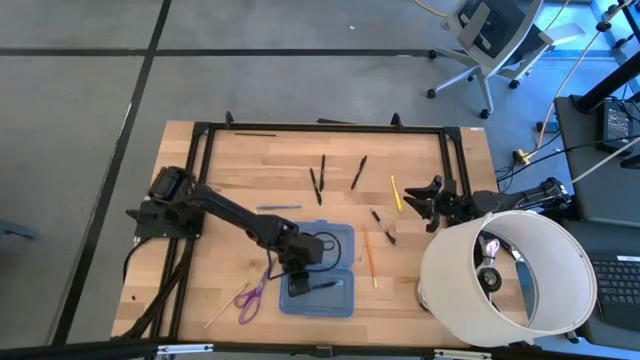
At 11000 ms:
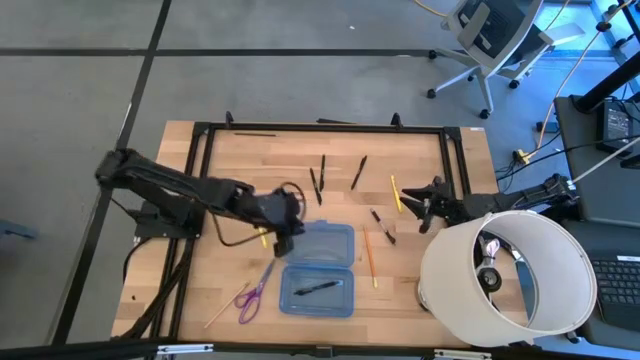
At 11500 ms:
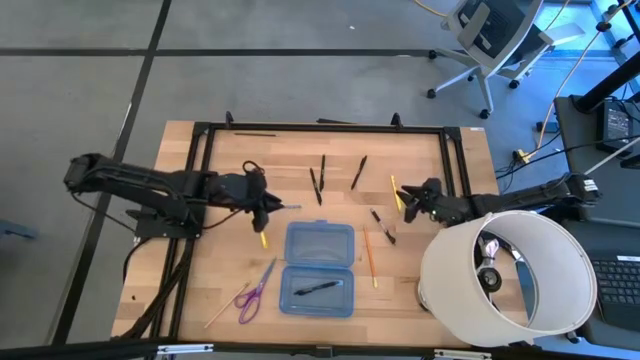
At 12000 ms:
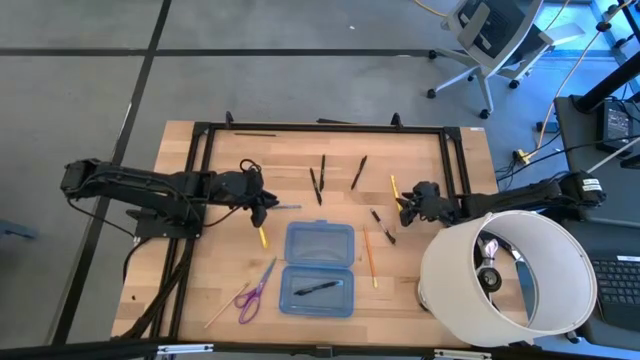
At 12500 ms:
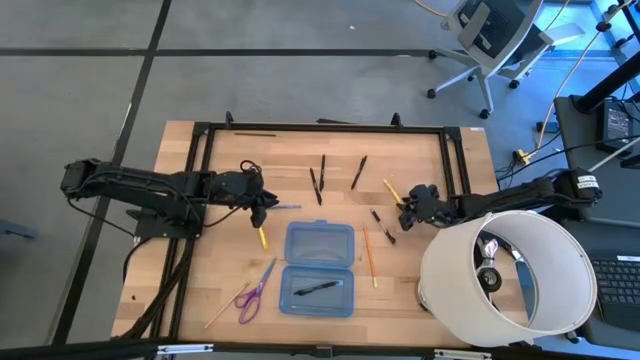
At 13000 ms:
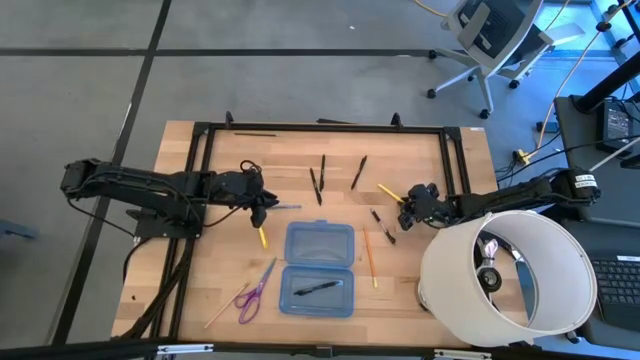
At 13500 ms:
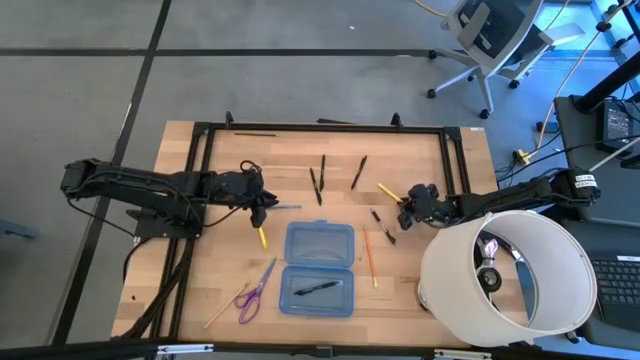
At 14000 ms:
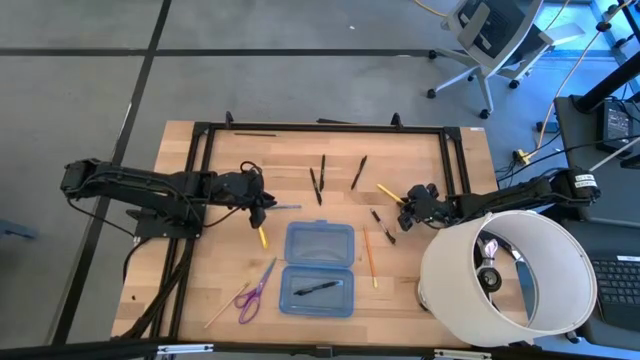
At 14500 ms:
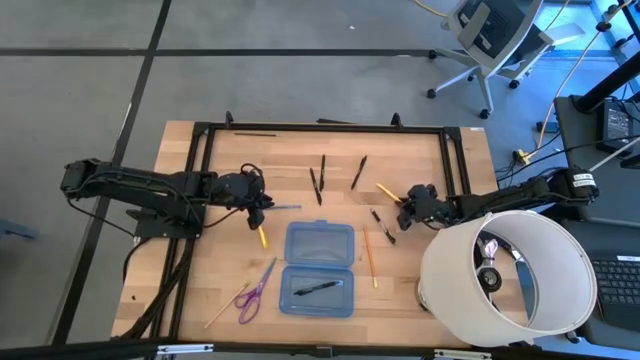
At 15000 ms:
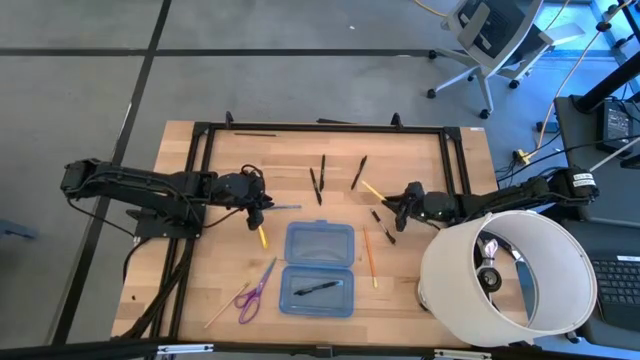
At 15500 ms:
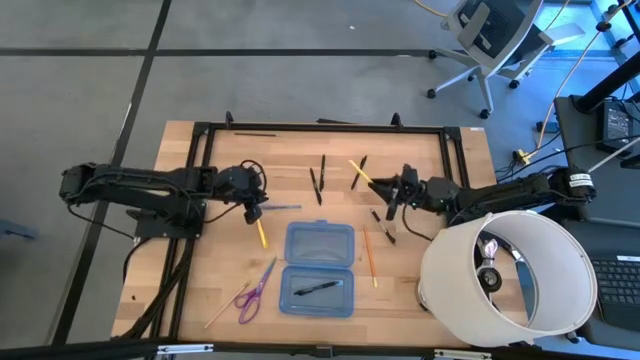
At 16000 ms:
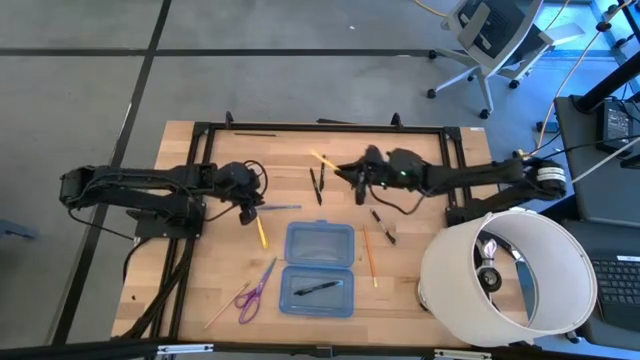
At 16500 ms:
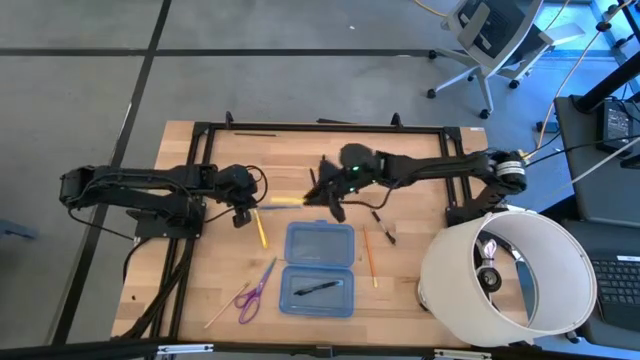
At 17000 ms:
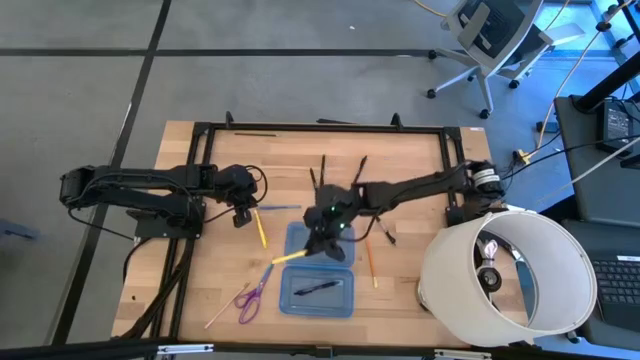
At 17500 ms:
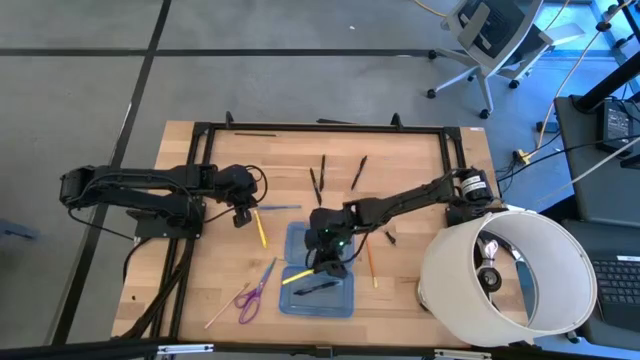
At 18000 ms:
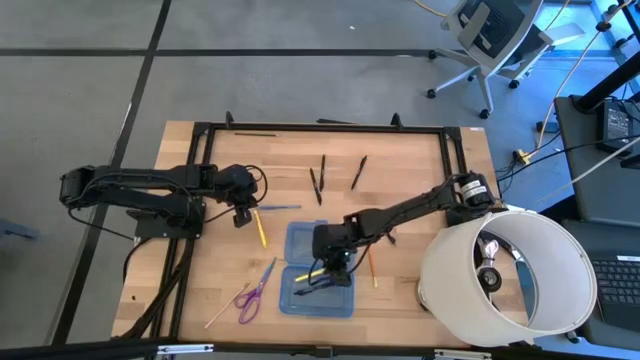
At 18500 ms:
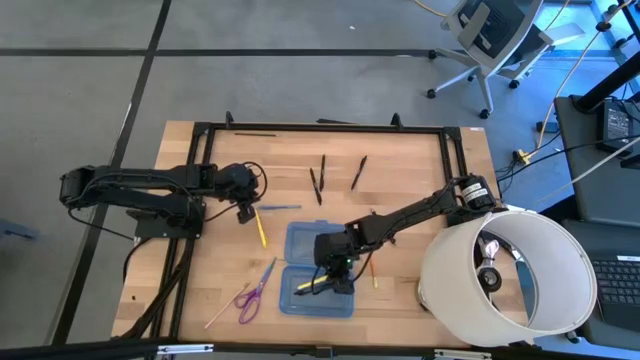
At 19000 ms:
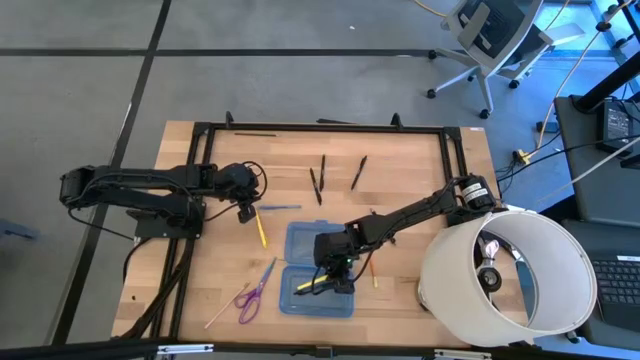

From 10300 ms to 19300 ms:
Task: Pick & place school supplies into a supply box
Put the yellow pen into the blue supply box

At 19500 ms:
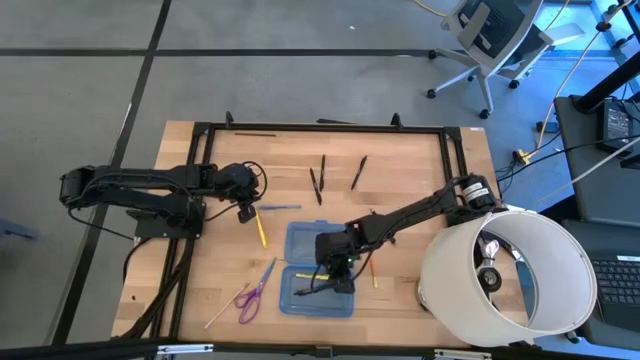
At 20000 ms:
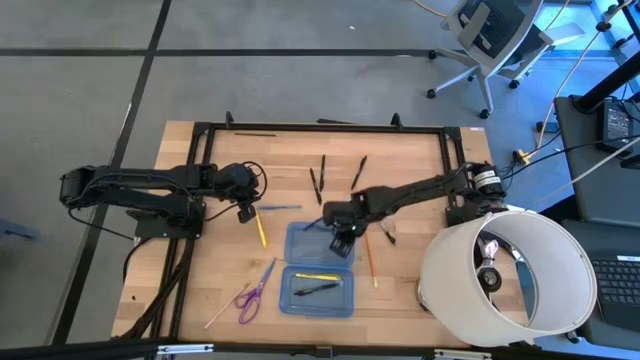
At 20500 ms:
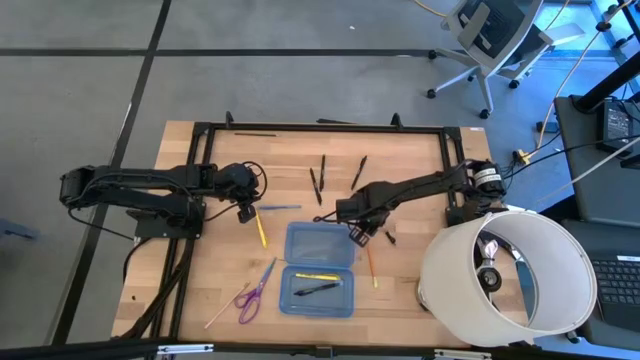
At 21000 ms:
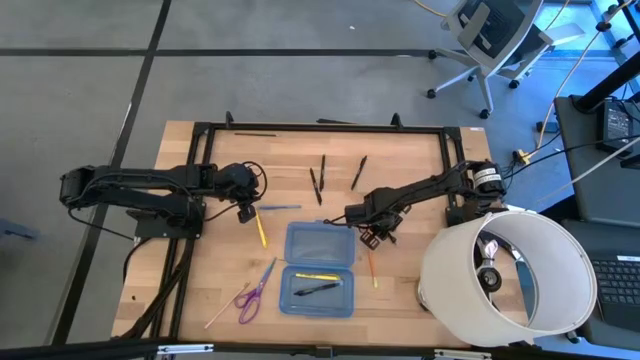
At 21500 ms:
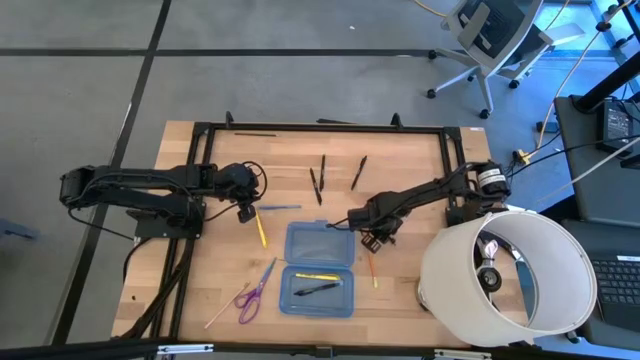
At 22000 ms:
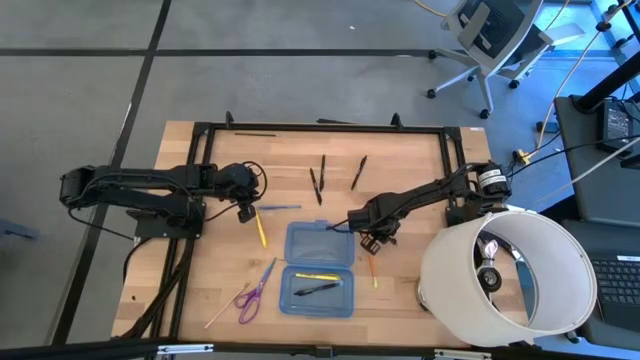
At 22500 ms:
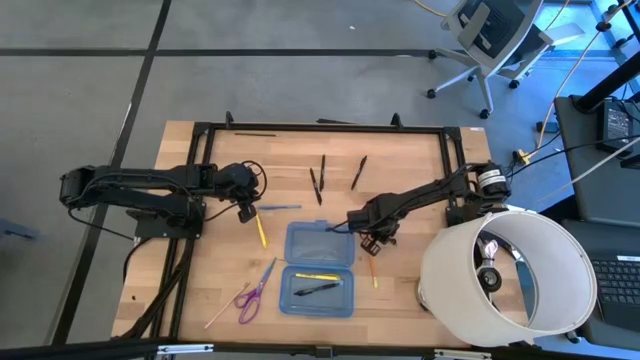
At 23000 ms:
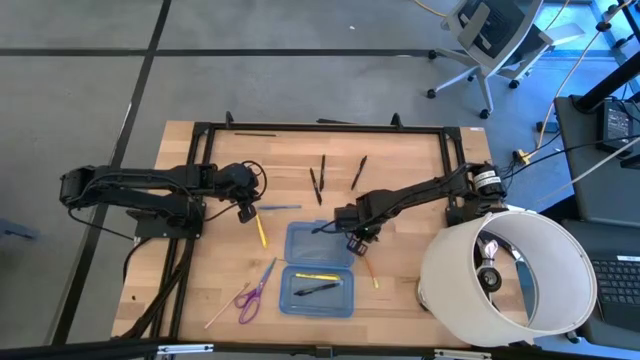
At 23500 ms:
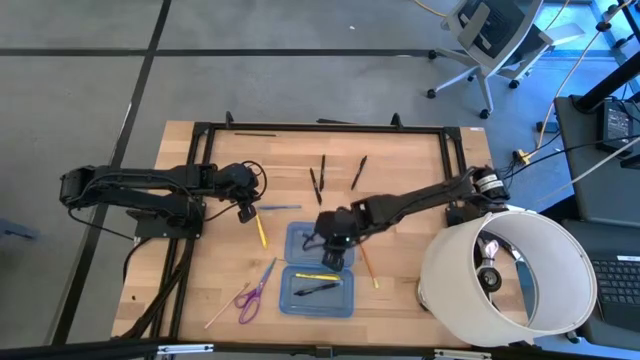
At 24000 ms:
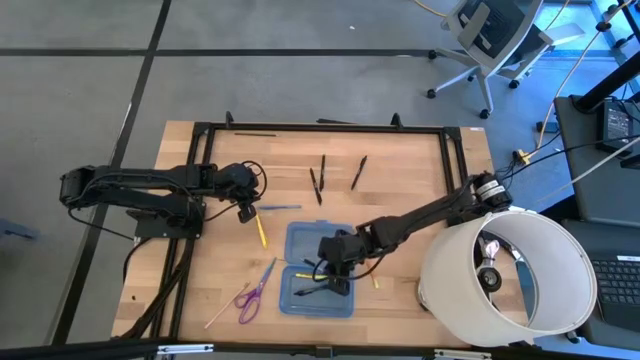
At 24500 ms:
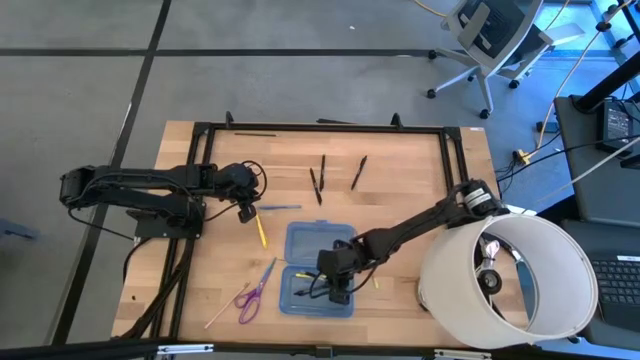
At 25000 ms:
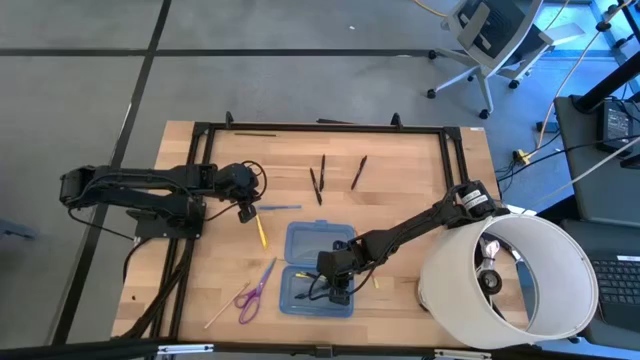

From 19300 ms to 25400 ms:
Put the black pen into the blue supply box

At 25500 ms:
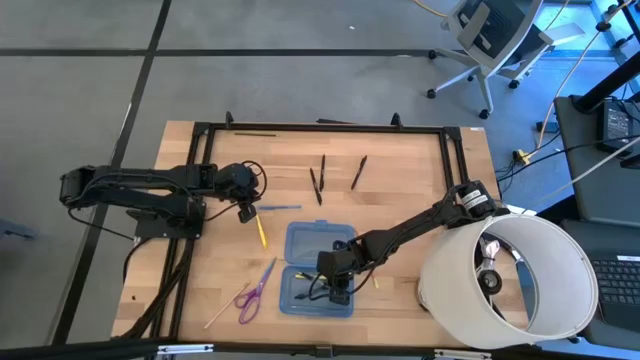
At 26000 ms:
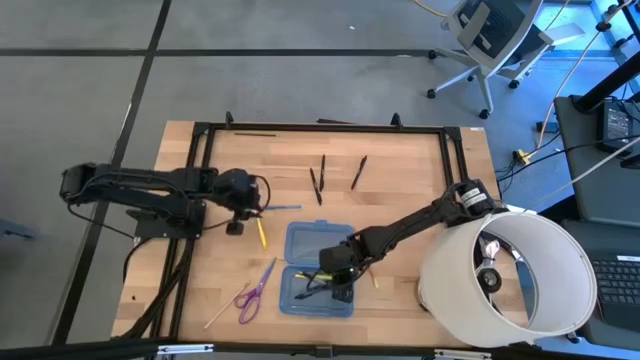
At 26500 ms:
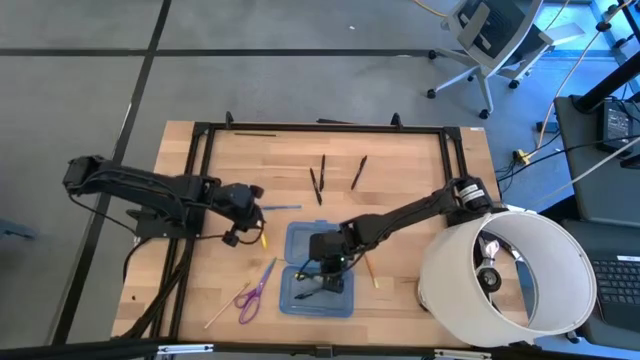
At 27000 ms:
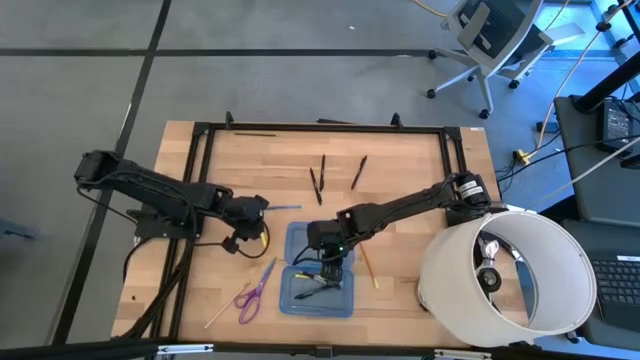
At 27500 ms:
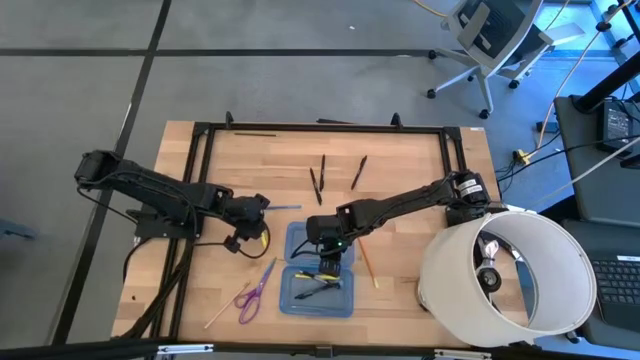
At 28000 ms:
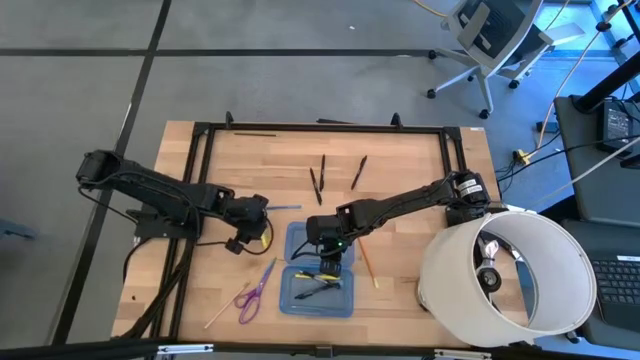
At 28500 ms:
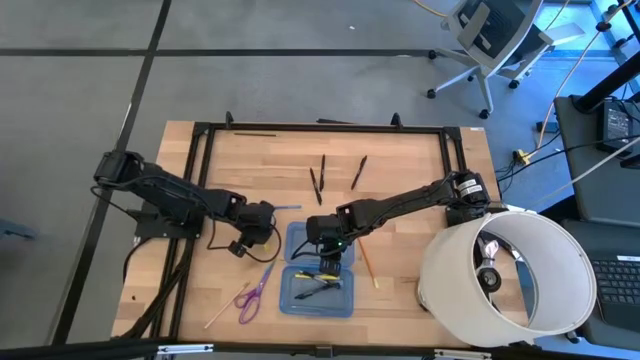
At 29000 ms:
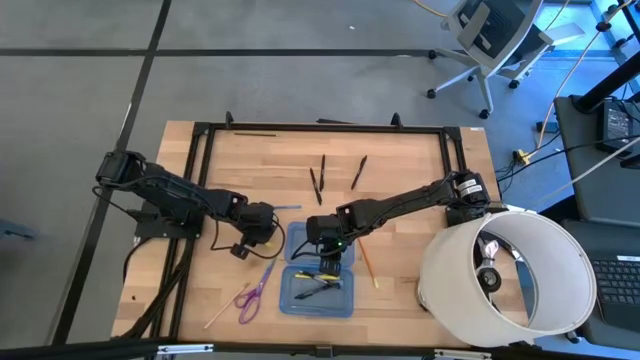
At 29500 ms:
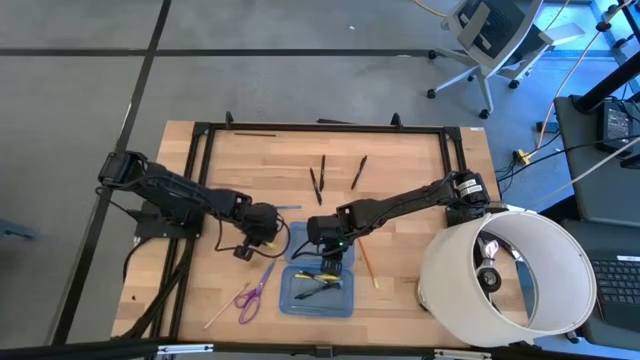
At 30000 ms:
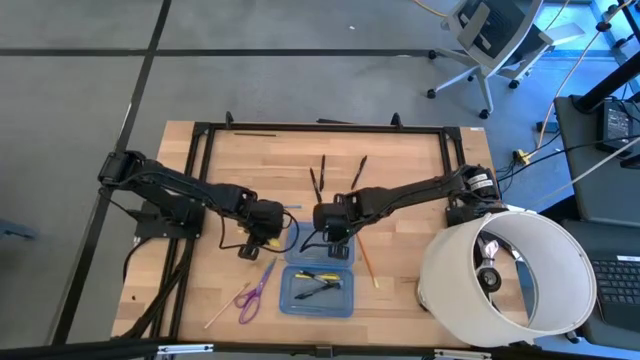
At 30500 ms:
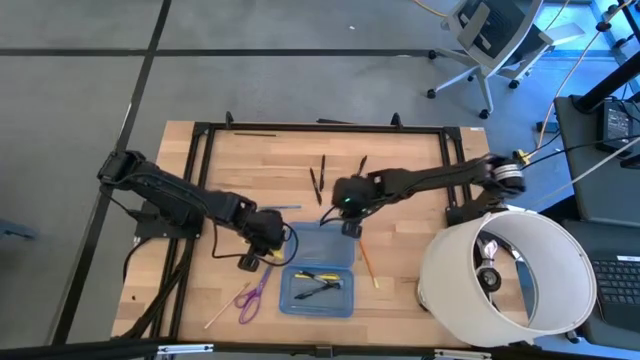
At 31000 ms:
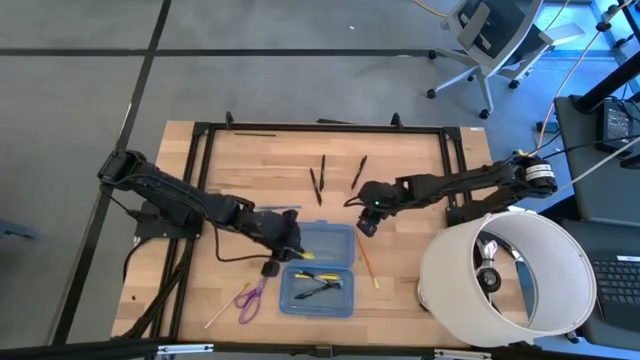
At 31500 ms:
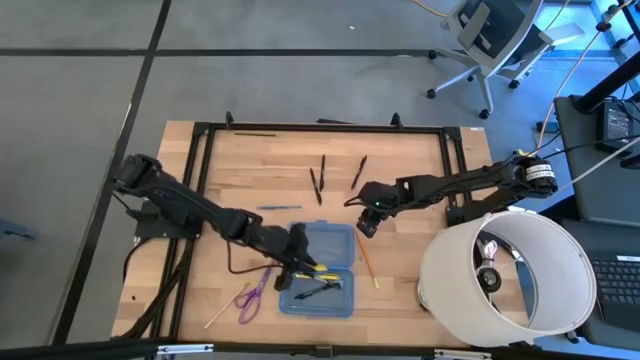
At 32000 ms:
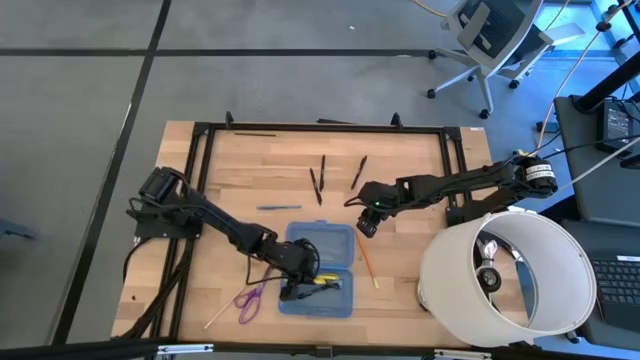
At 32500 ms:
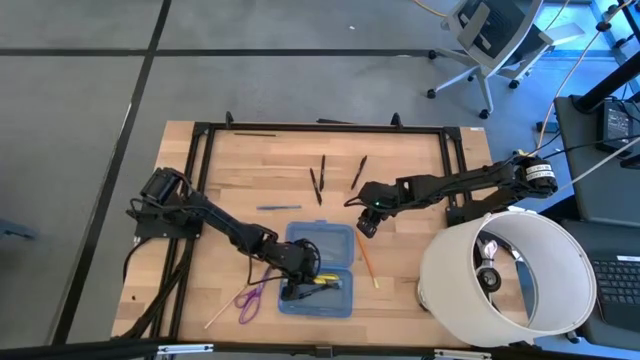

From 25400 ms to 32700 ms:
Put the yellow pen into the blue supply box
